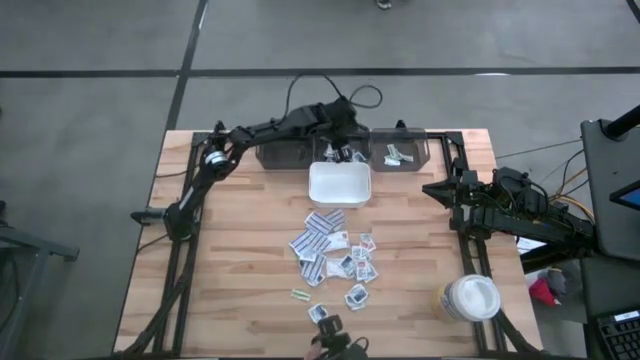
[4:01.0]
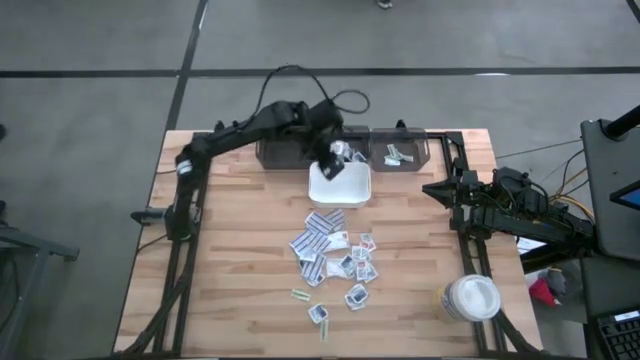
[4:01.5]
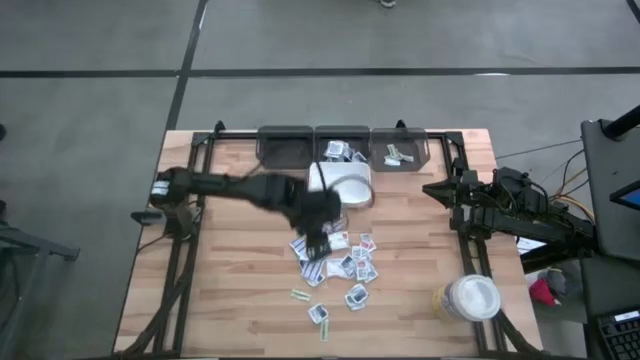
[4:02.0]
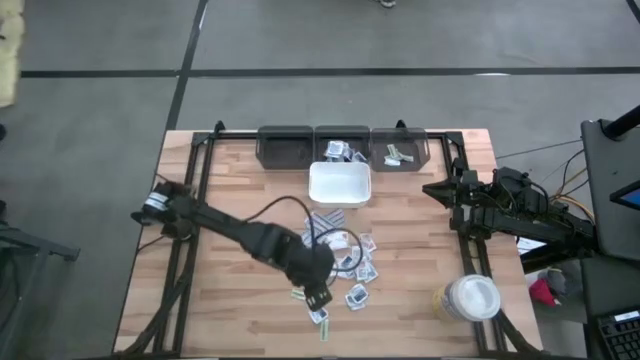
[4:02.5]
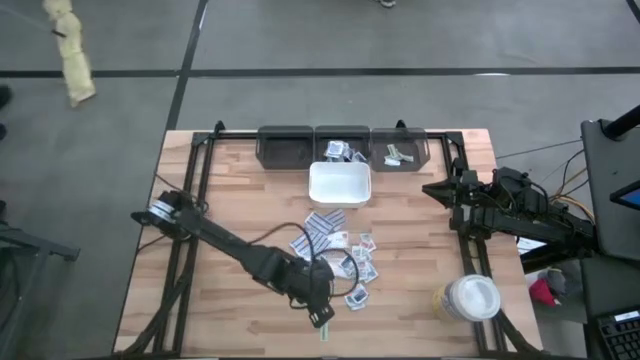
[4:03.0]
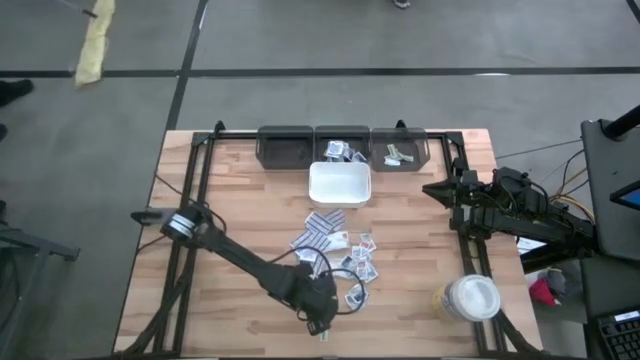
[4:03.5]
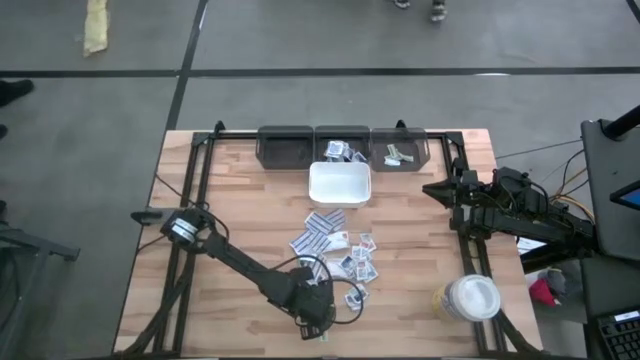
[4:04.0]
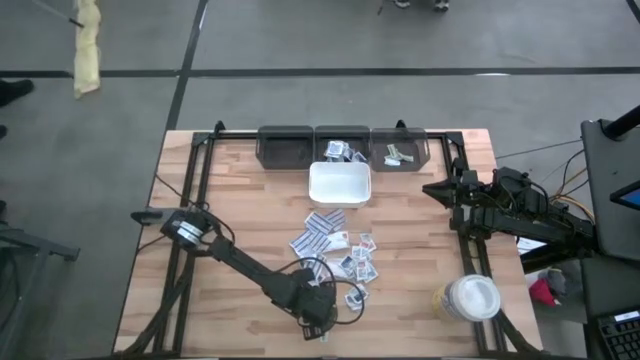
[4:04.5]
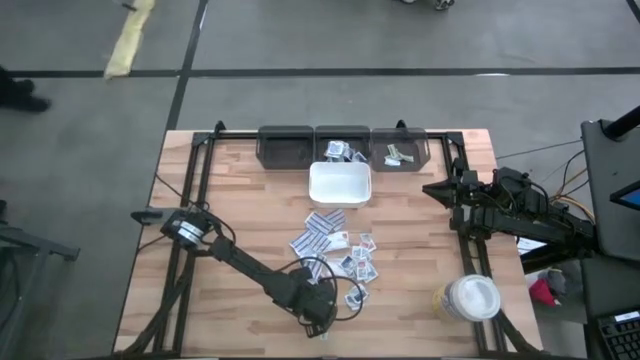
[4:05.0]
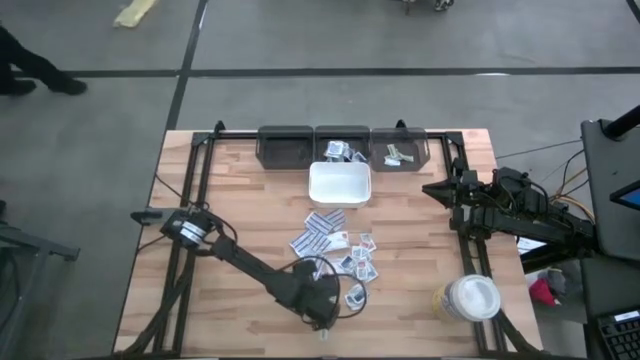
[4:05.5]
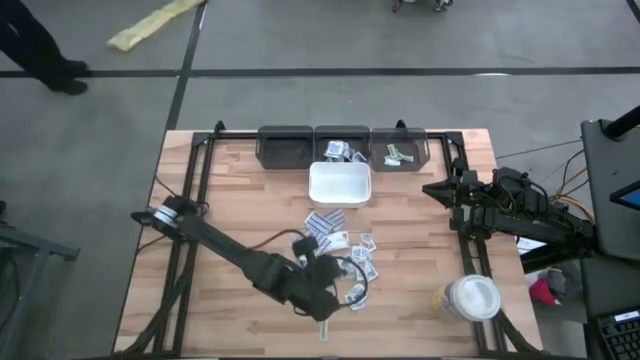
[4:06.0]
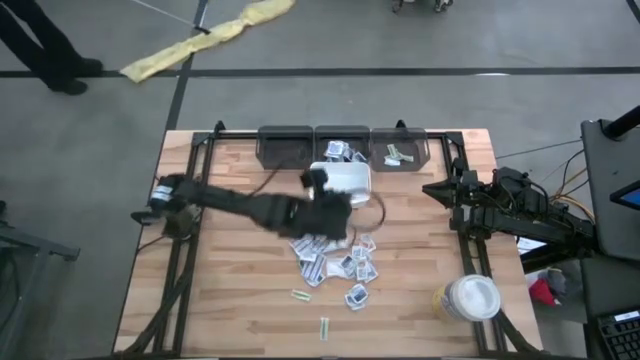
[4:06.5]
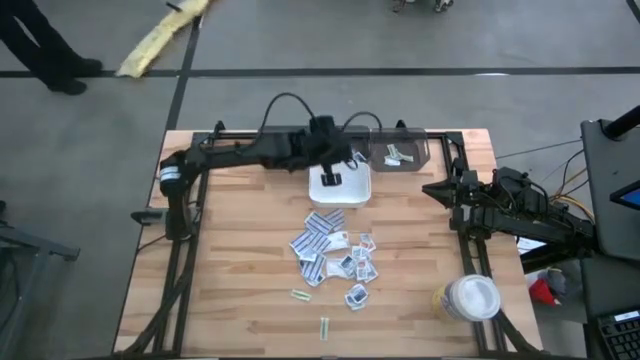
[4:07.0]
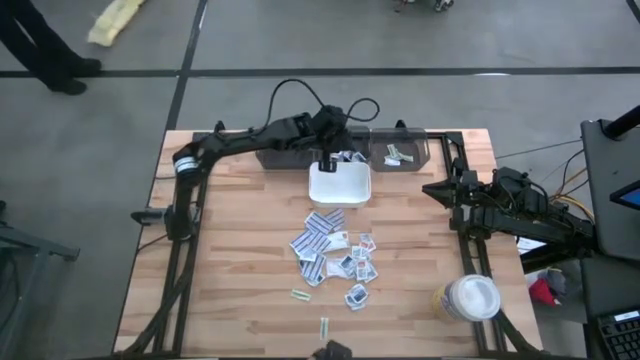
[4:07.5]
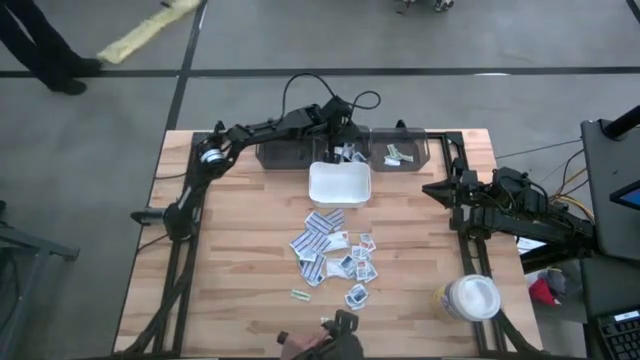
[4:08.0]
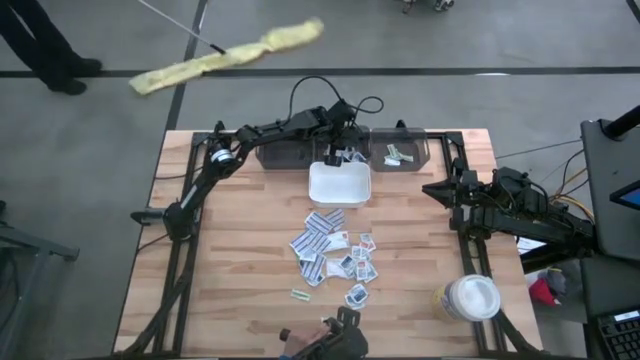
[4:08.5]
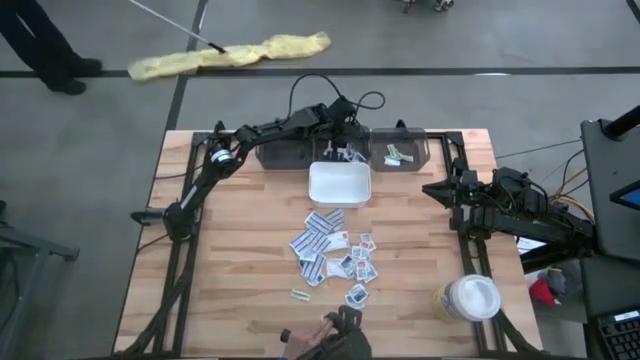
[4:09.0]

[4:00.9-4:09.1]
Task: Pick & Place First Aid Supplies
Put the blue alcohol pad into the middle gray bin

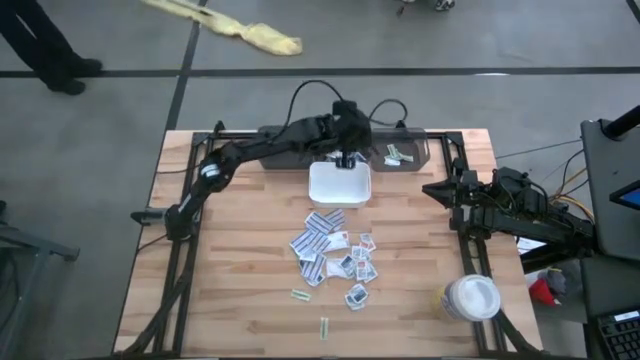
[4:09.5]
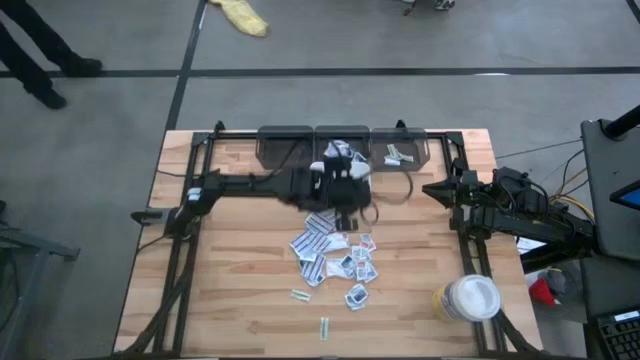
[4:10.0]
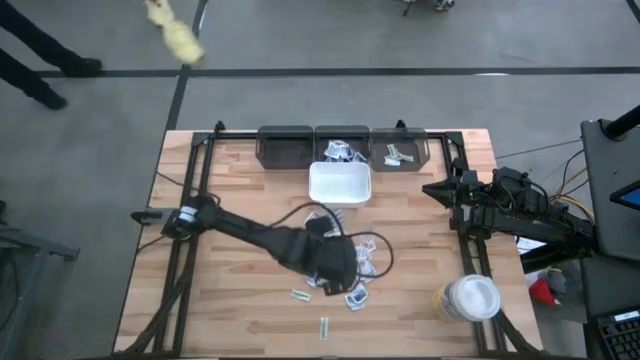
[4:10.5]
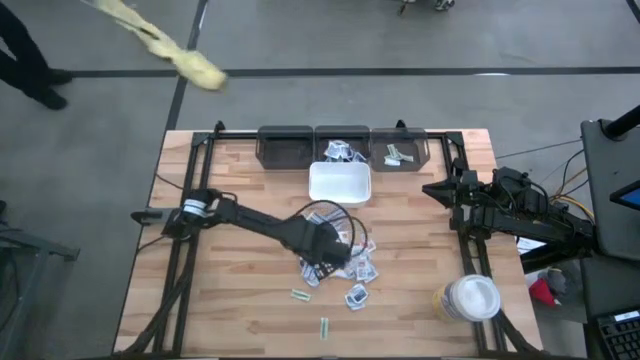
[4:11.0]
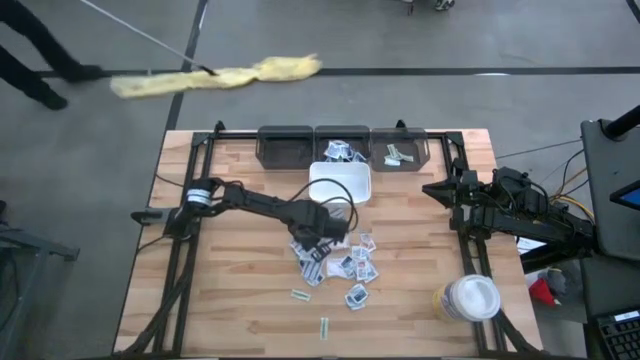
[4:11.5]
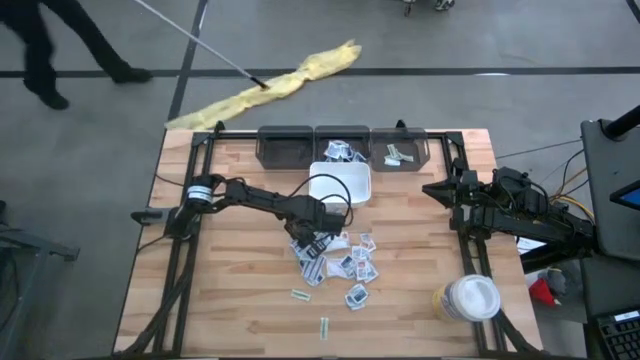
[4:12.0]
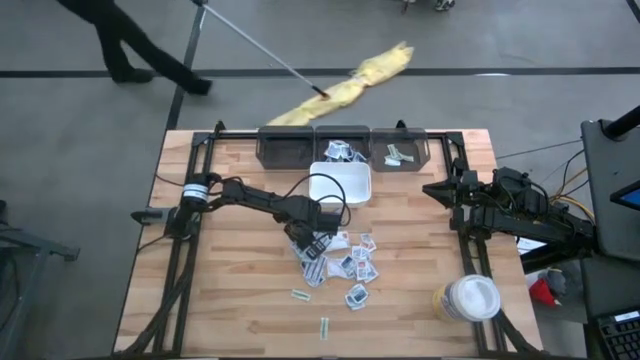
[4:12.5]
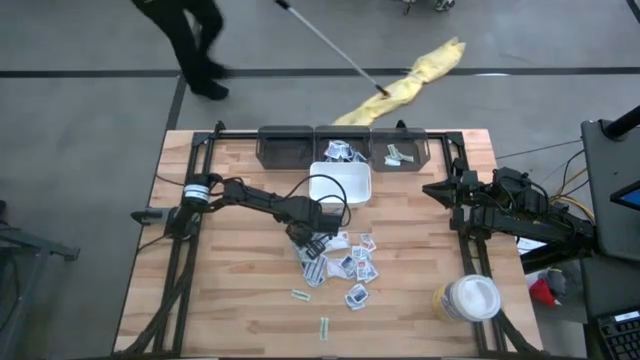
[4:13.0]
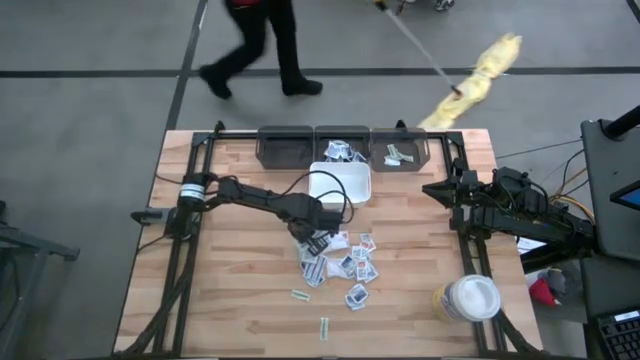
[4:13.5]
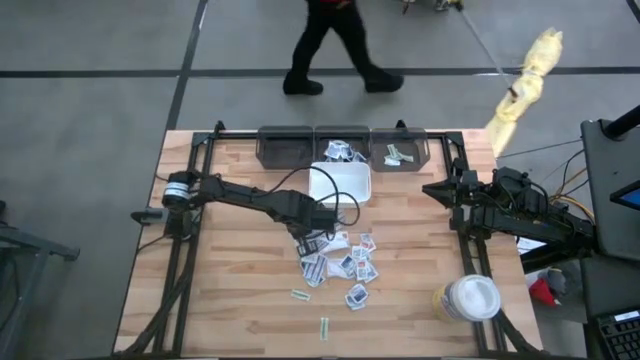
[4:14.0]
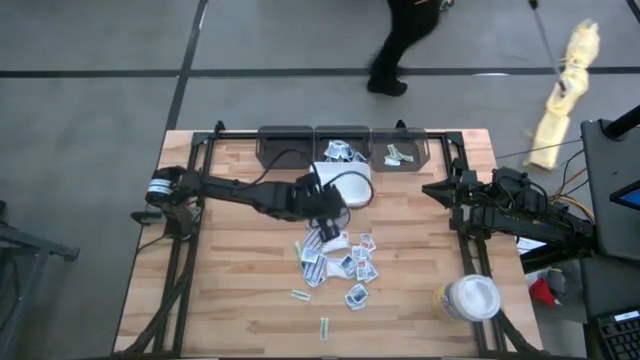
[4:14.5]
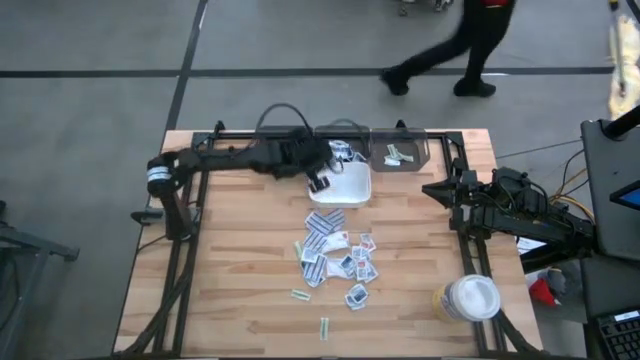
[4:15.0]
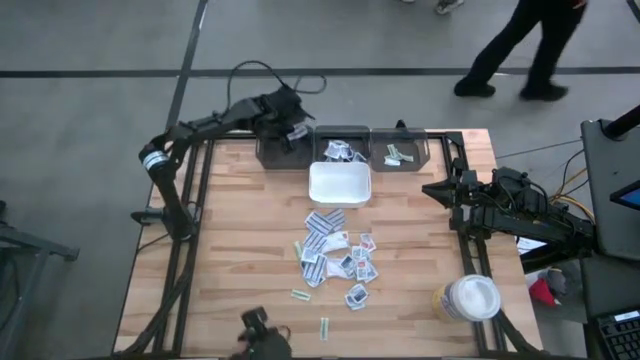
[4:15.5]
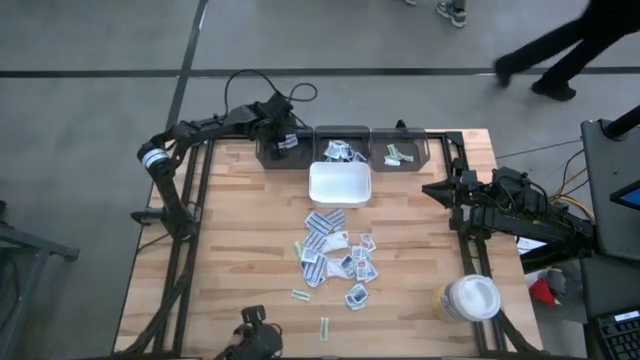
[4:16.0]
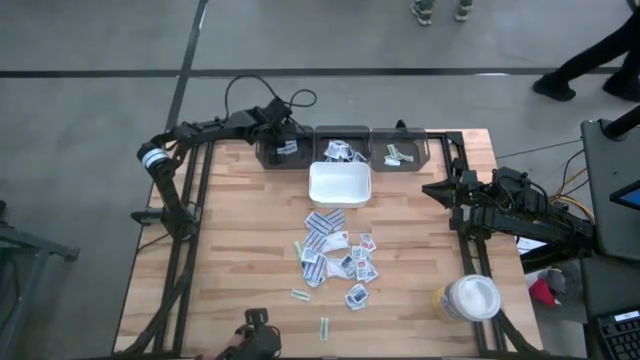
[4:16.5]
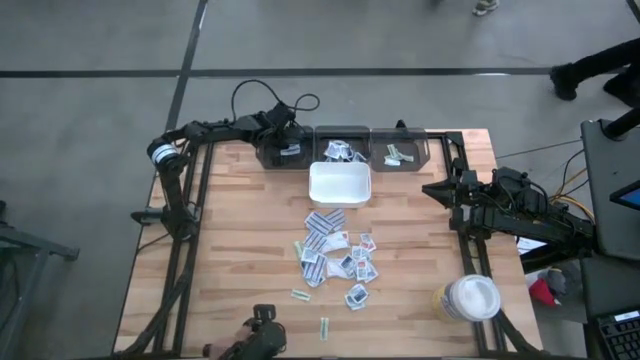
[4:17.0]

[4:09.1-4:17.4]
Put the blue bandage pack into the left gray bin

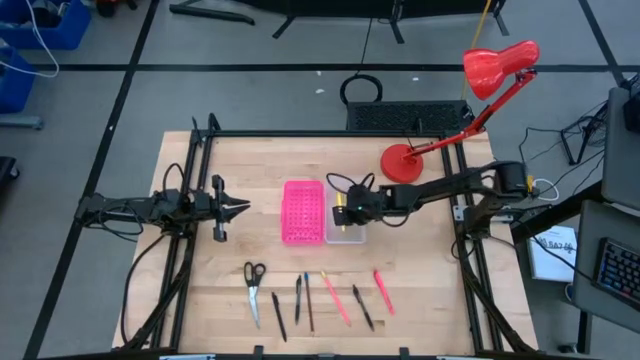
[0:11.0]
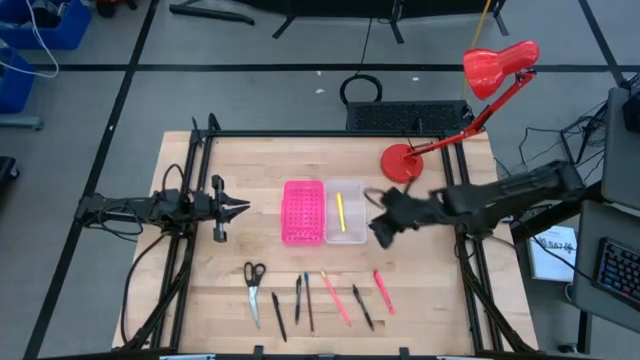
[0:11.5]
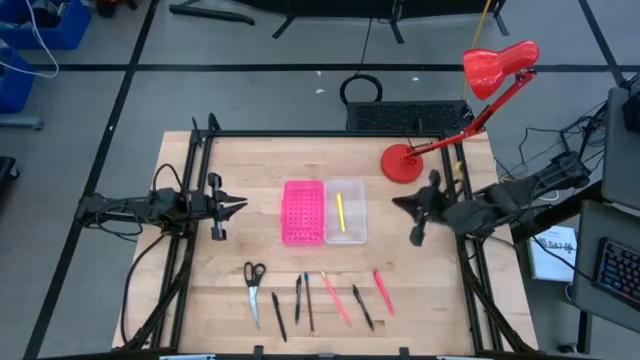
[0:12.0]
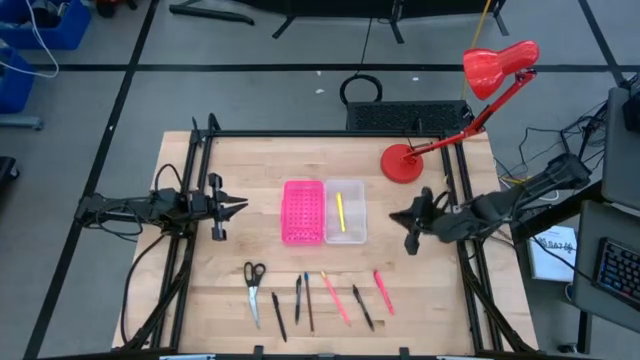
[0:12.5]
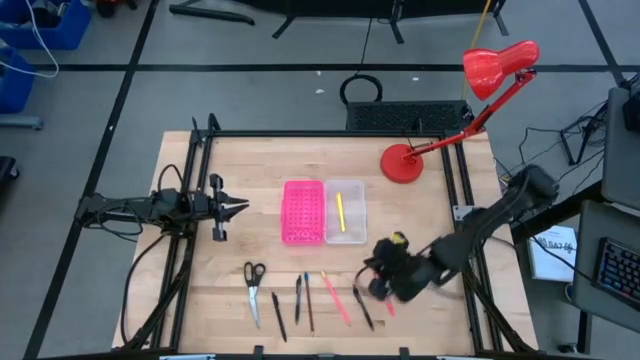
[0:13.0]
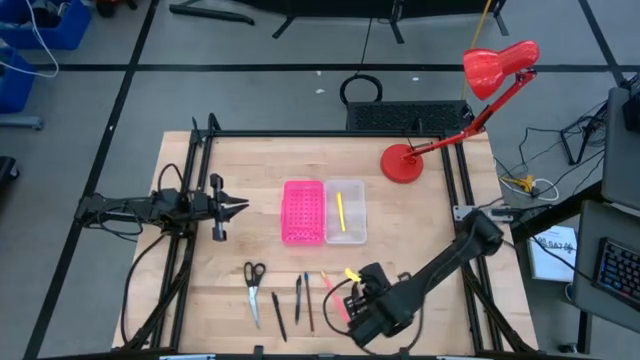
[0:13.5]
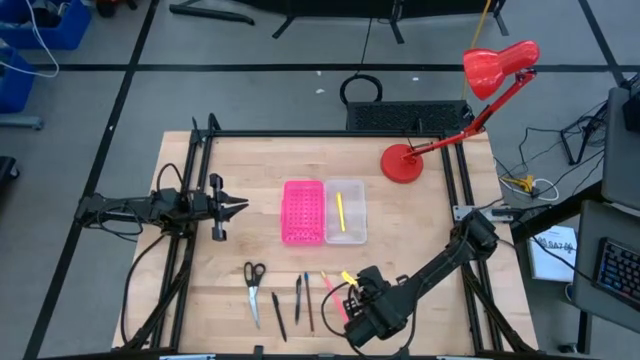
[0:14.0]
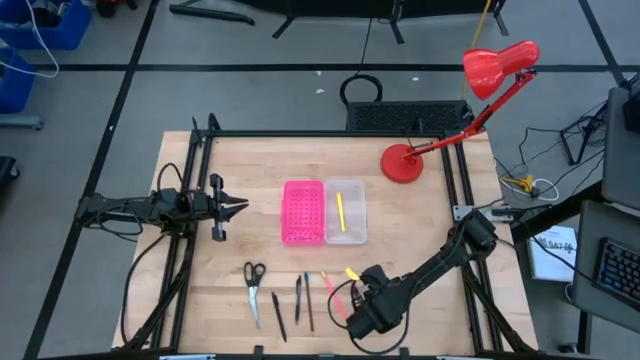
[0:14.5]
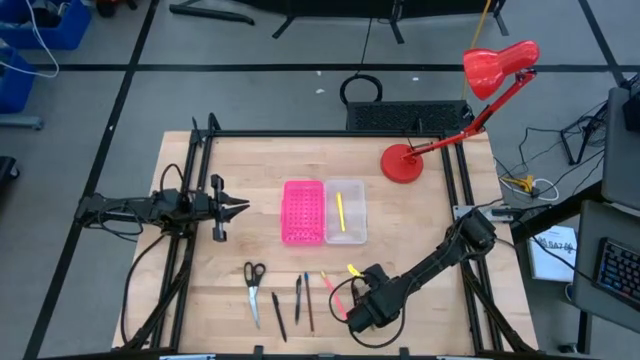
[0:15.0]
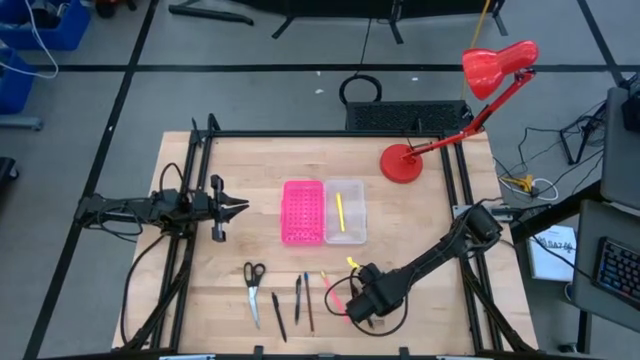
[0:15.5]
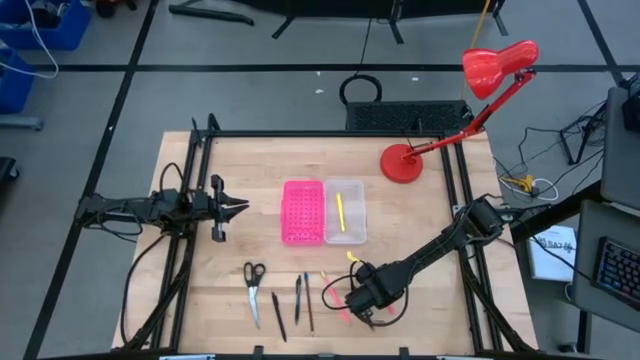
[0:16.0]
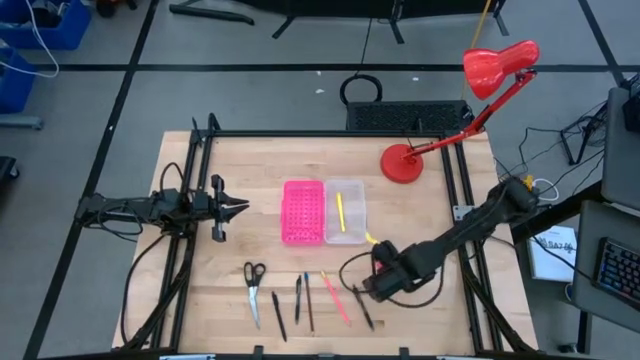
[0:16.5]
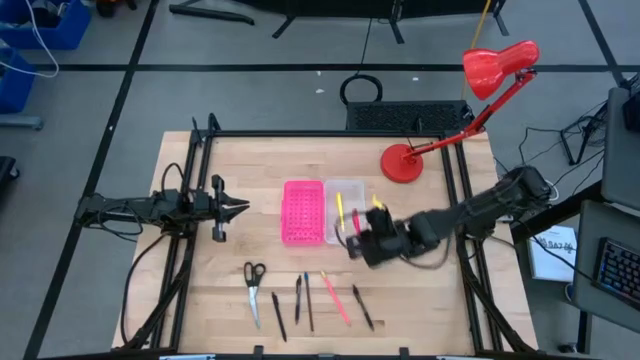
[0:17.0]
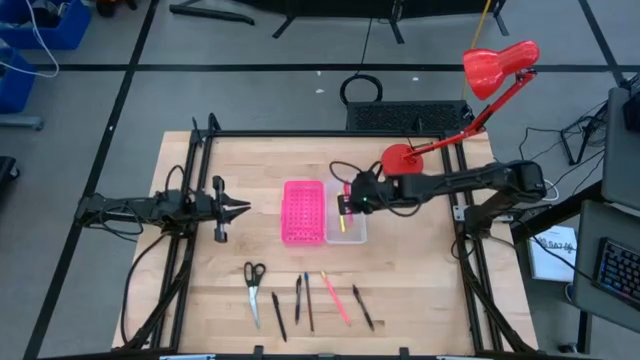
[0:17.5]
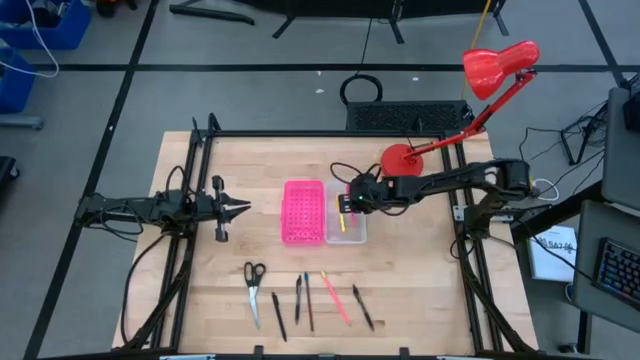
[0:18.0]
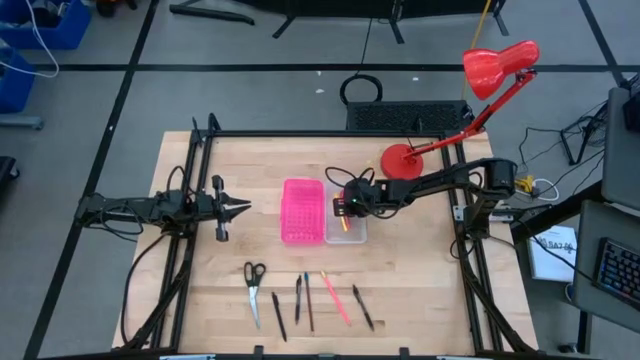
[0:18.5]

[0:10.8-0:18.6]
Task: Pick & place school supplies into a supply box
Put the pink pen into the supply box
